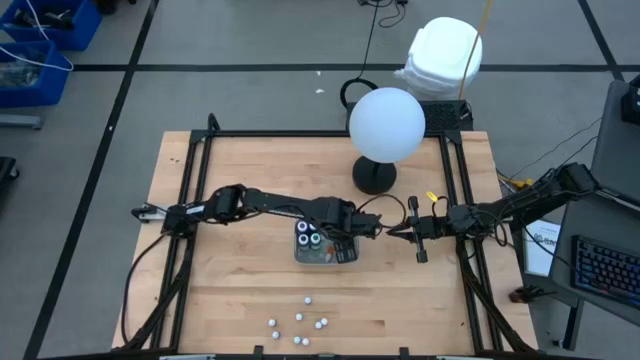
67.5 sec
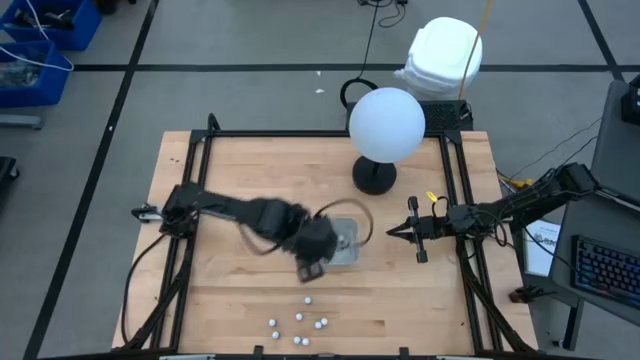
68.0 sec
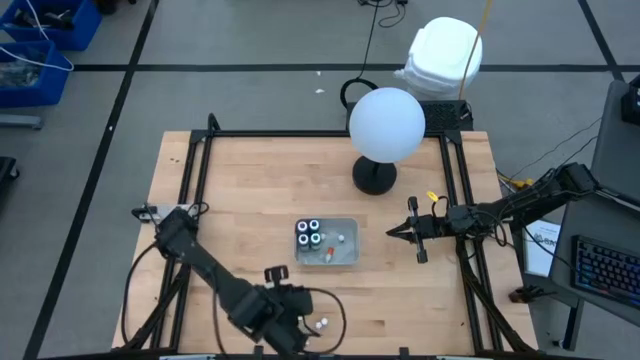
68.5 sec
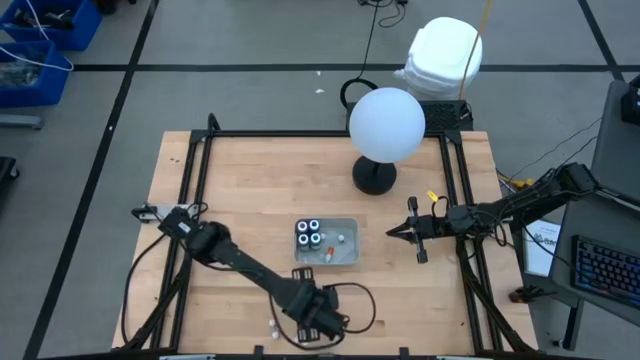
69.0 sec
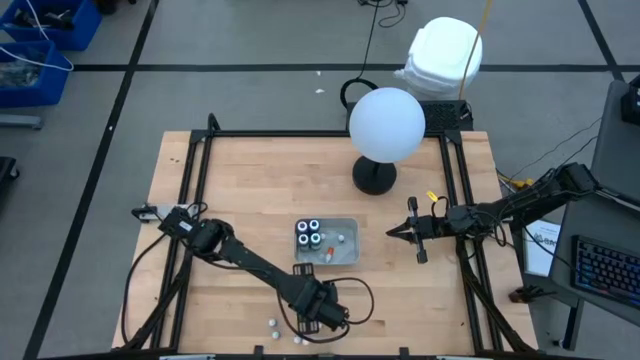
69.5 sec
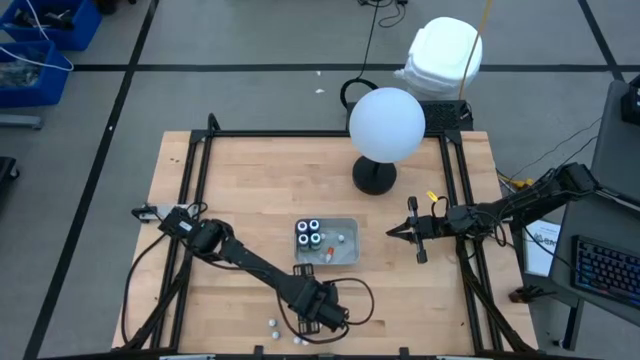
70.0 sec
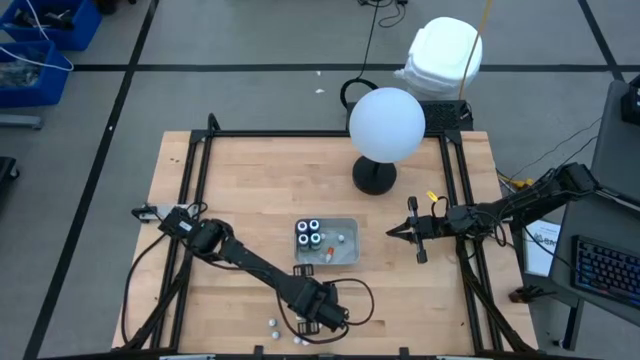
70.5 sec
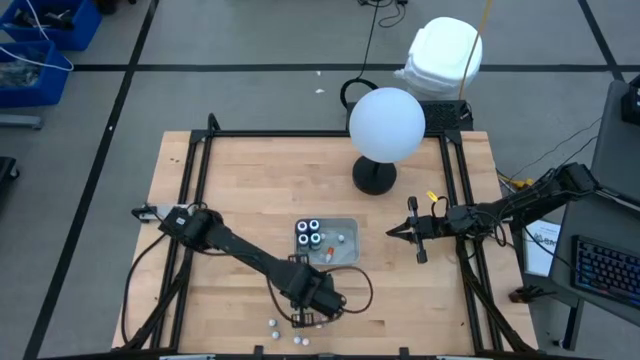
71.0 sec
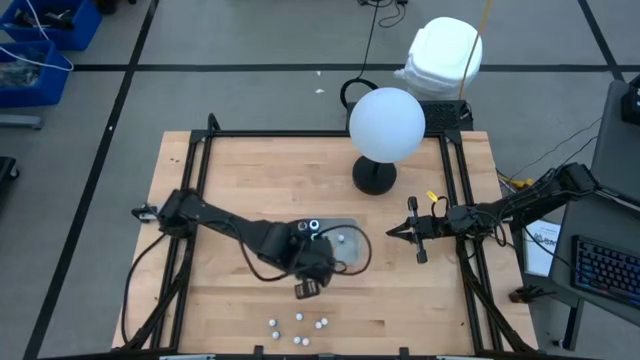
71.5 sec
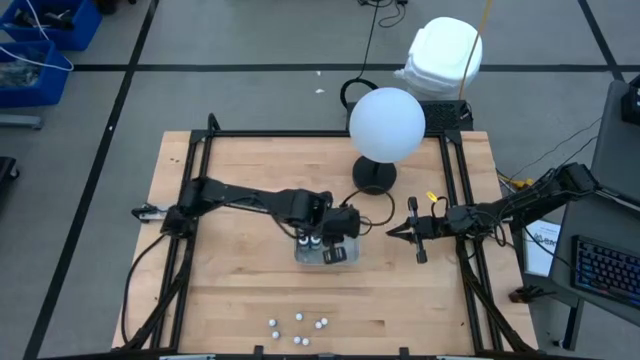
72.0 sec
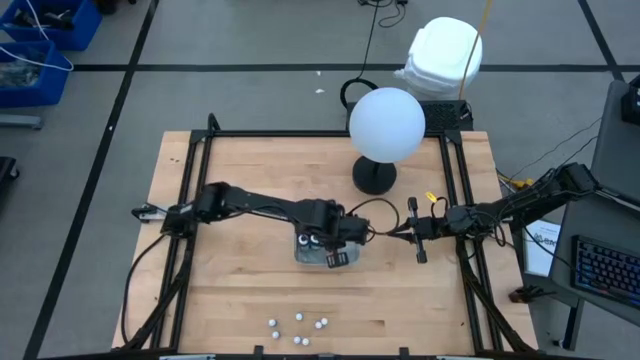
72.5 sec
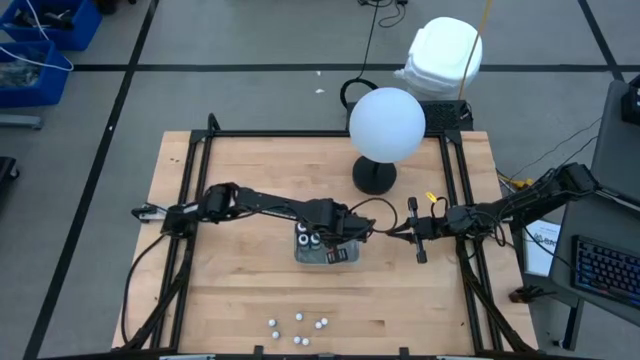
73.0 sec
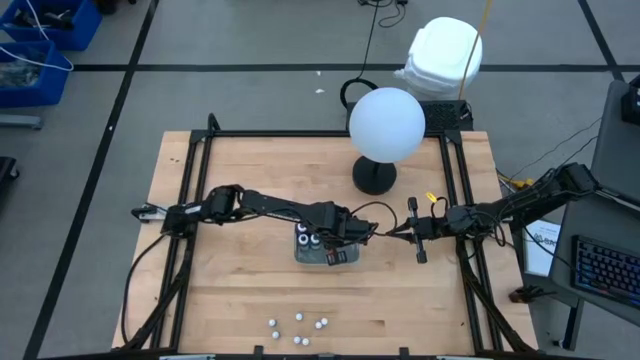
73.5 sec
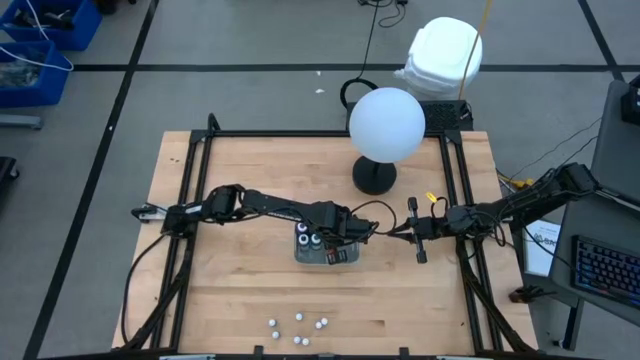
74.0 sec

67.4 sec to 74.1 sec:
Task: Pick & Place food coloring
Put the small violet food coloring bottle into the gray bin

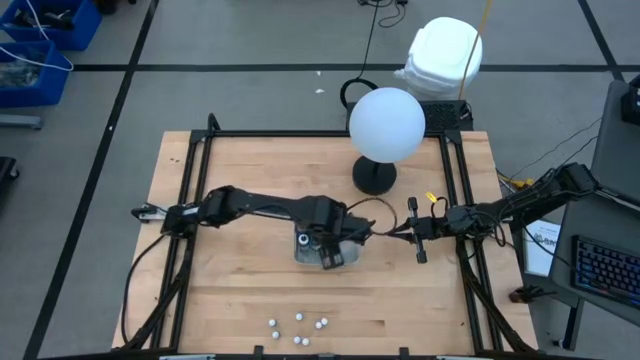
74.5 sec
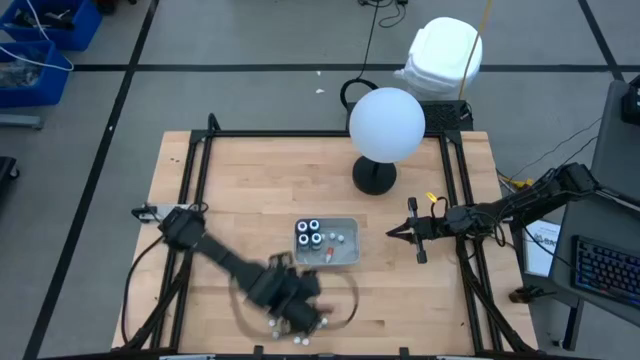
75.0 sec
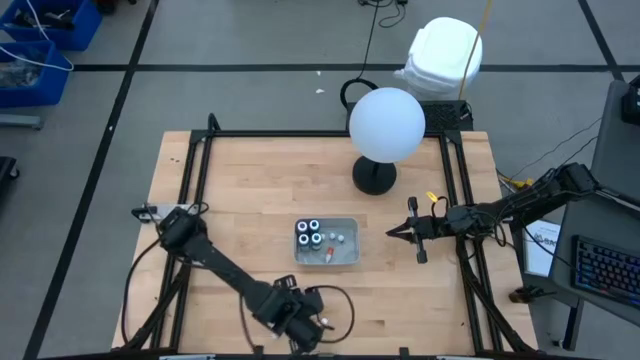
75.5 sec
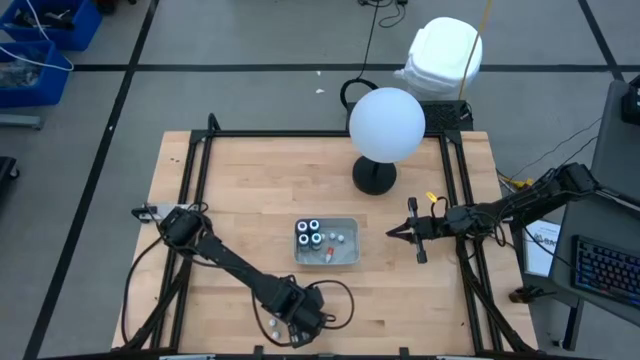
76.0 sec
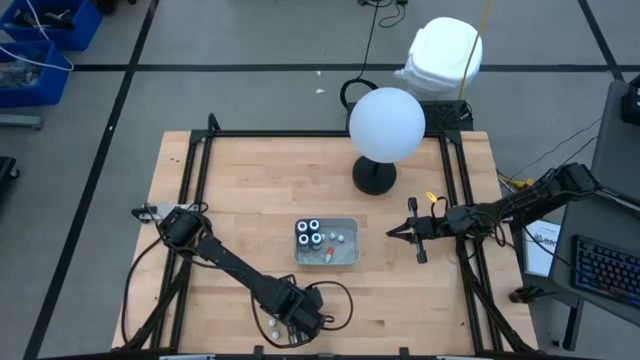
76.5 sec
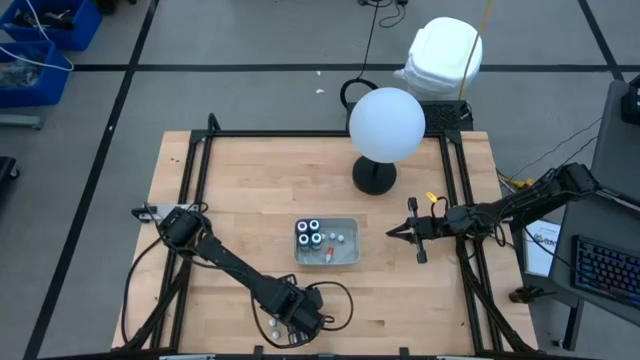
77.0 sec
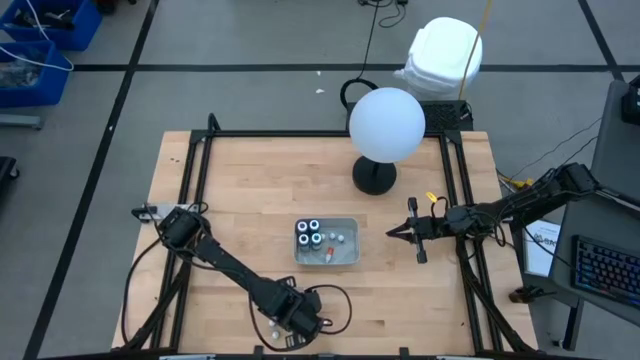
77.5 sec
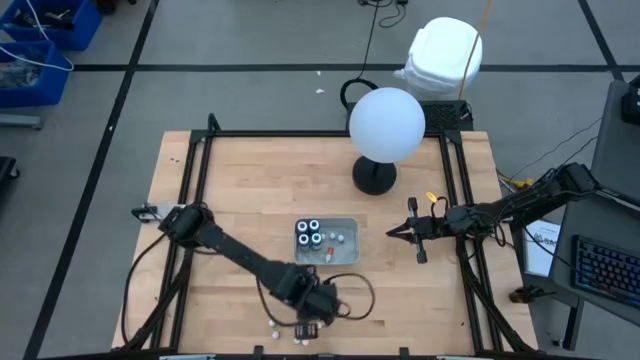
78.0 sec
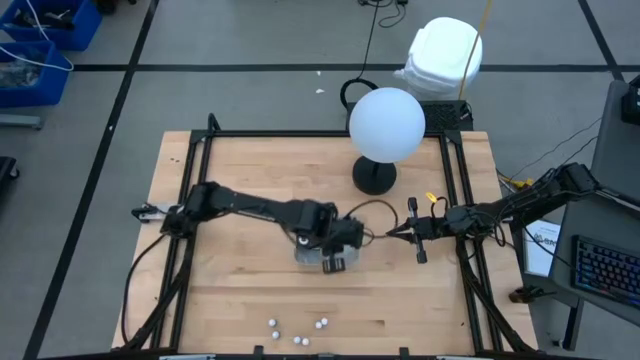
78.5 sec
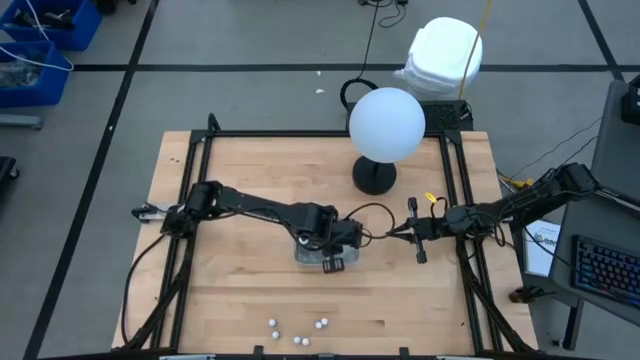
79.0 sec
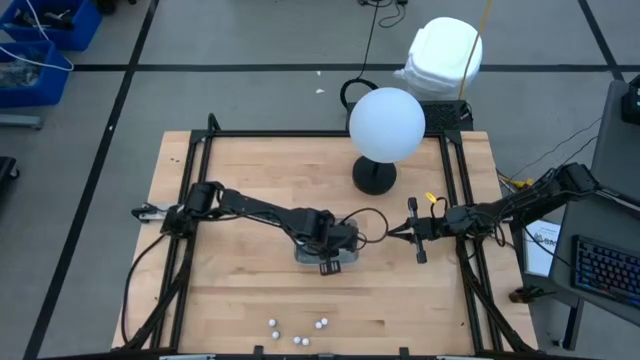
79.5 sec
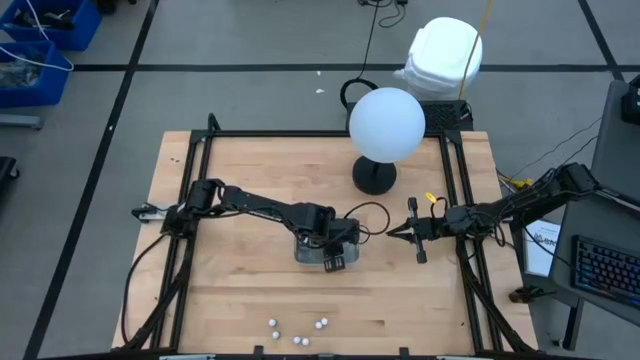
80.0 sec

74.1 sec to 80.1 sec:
Put the small violet food coloring bottle into the gray bin

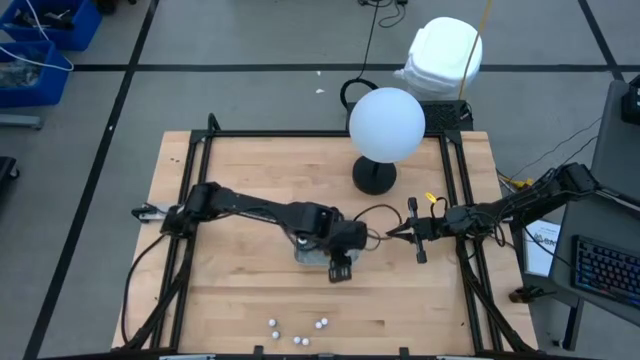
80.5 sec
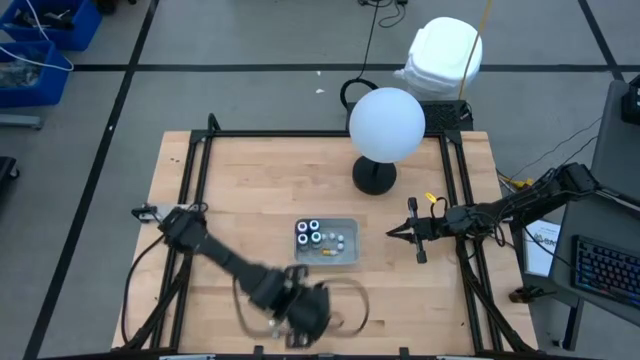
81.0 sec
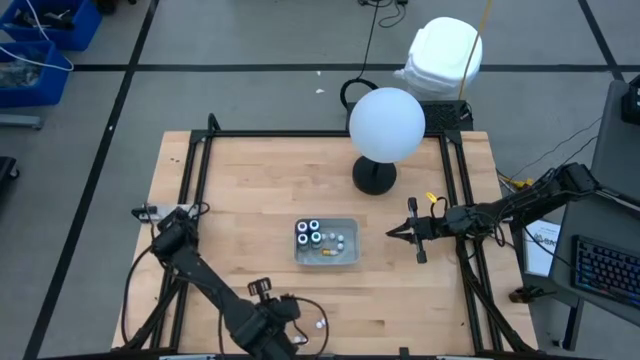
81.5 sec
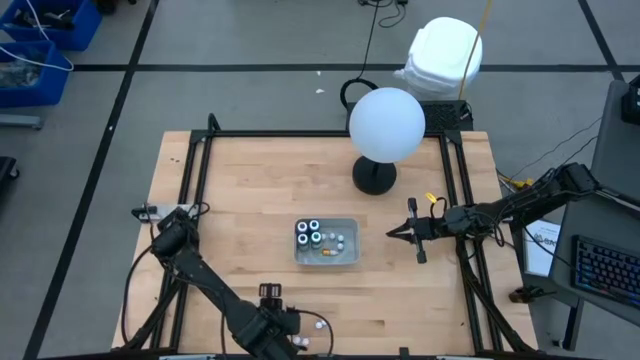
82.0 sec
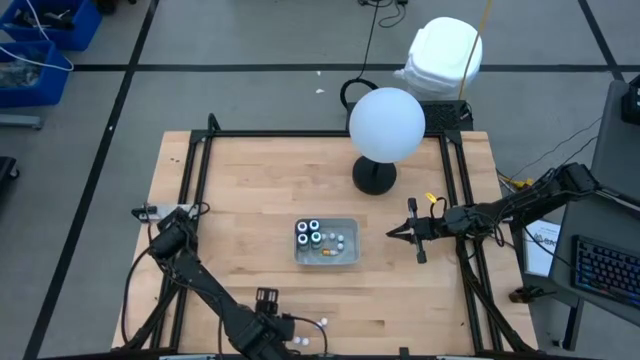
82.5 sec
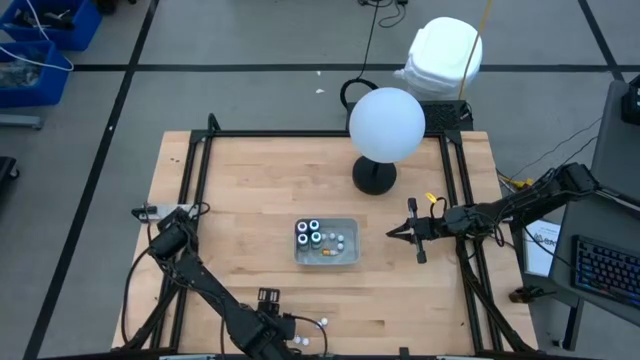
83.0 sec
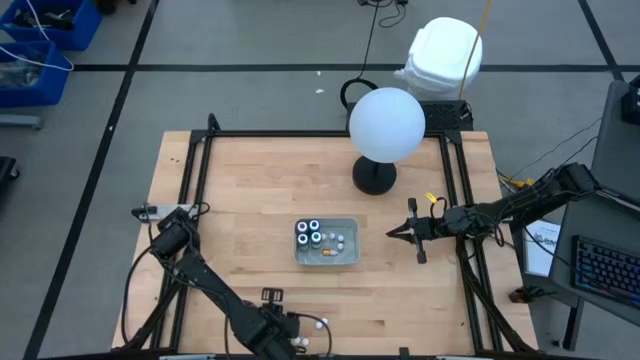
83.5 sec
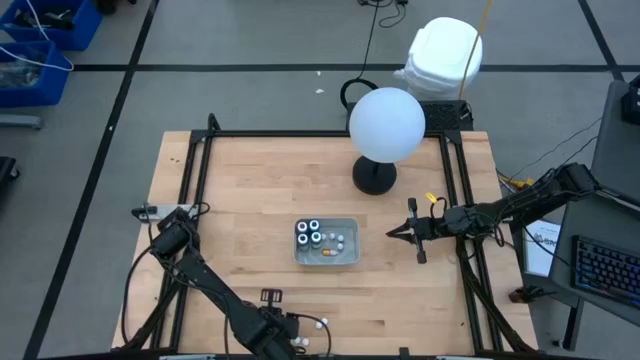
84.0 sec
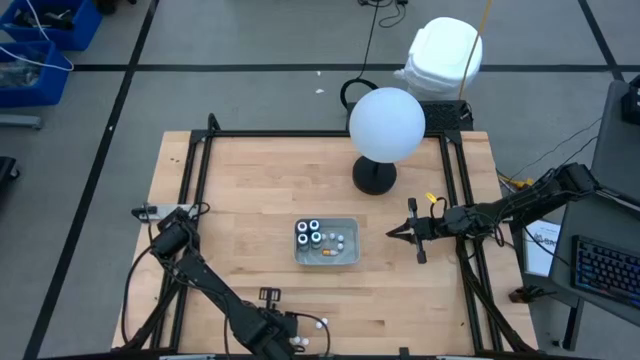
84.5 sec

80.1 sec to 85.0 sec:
Put the small violet food coloring bottle into the gray bin

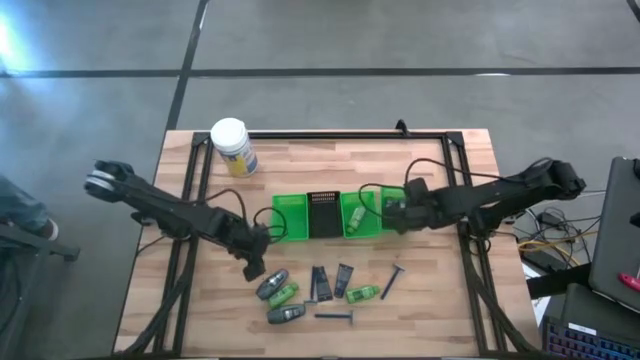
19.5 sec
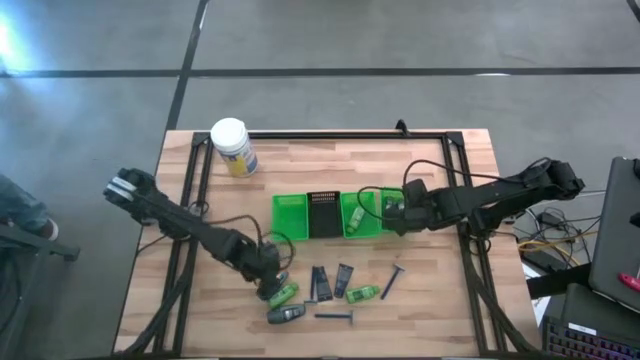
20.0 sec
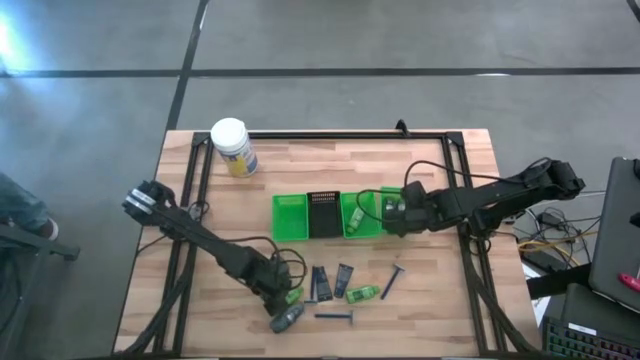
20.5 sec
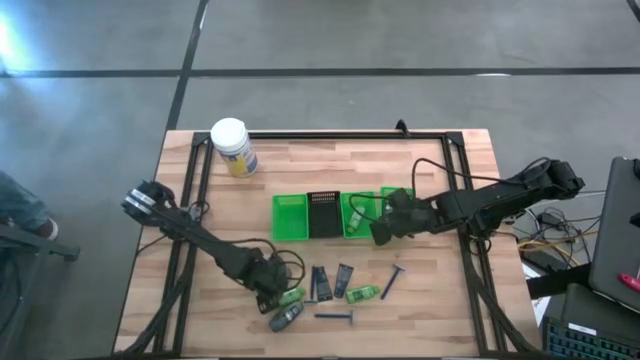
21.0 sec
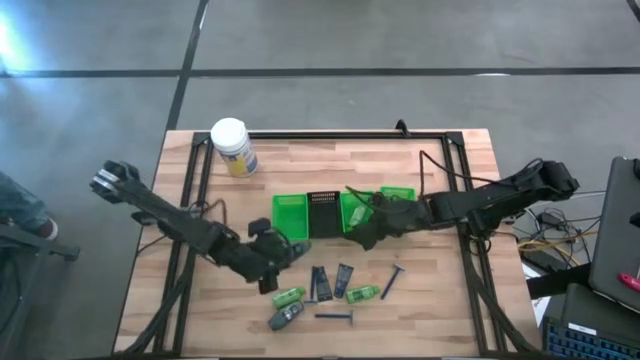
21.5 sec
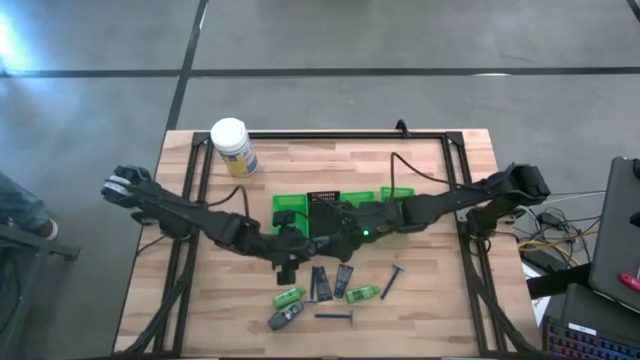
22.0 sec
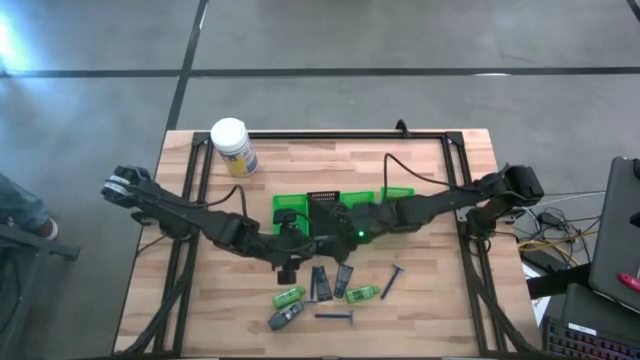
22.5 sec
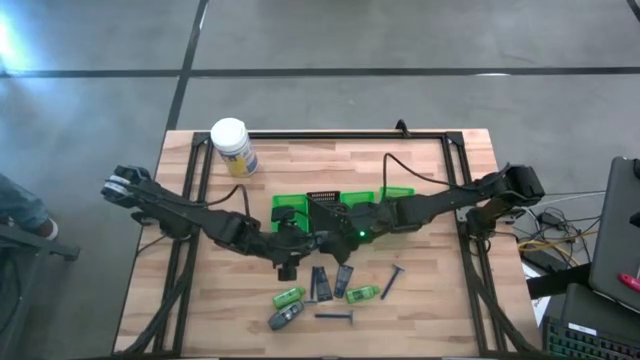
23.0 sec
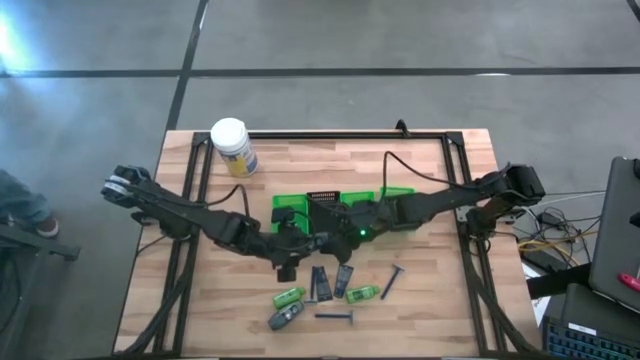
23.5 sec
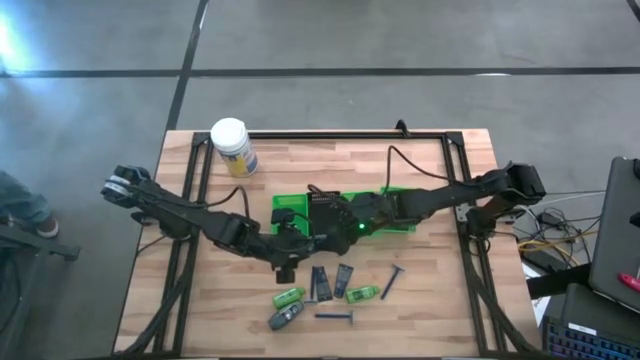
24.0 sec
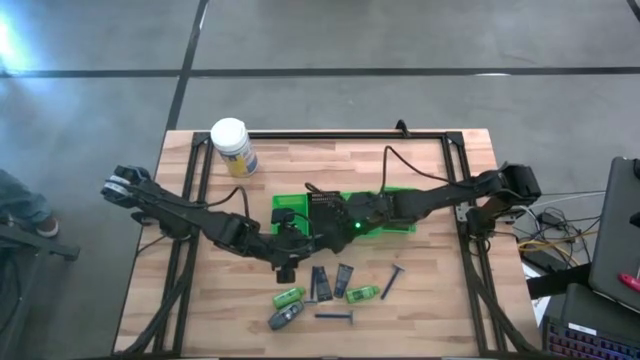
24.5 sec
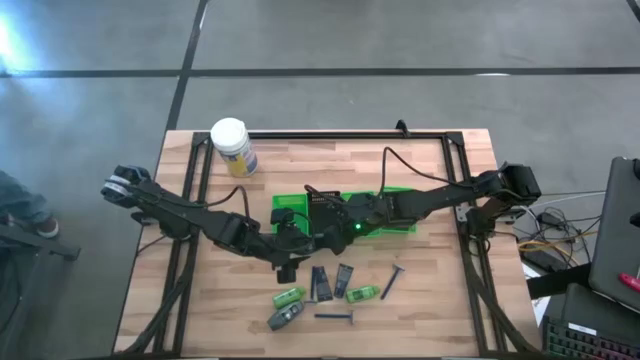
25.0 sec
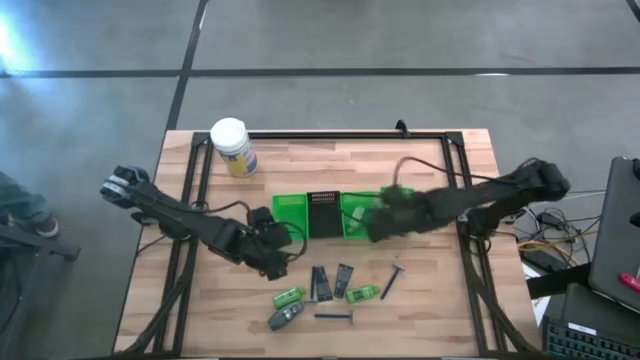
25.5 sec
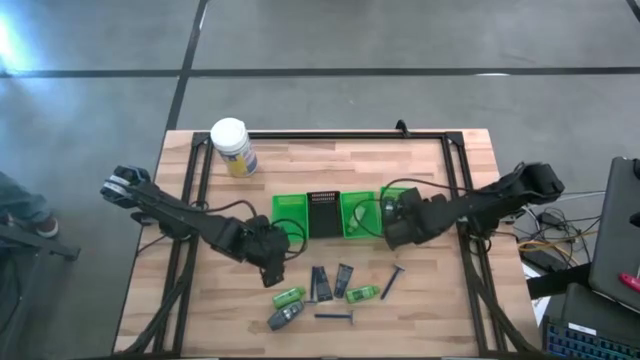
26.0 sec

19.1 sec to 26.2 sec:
Task: Pick & Place Travel size toiletries
Put the black deodorant into the right green basket
